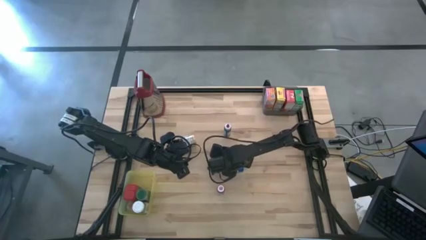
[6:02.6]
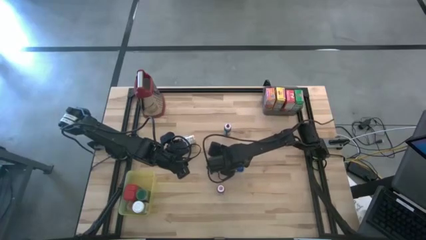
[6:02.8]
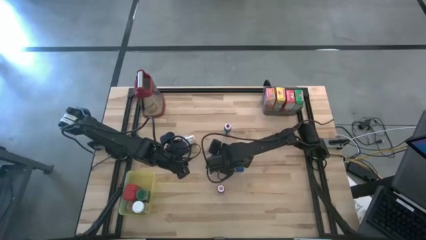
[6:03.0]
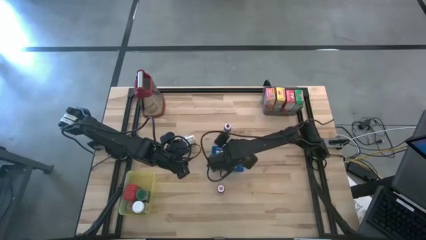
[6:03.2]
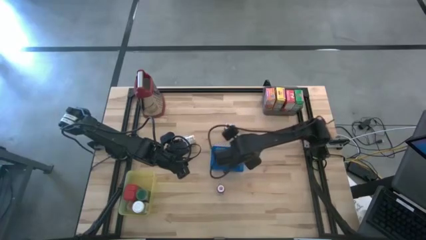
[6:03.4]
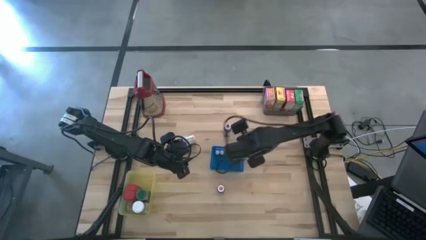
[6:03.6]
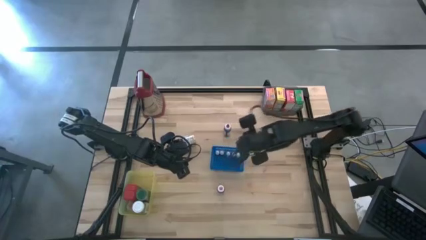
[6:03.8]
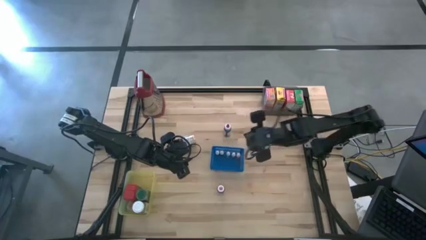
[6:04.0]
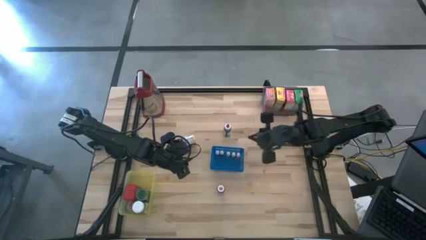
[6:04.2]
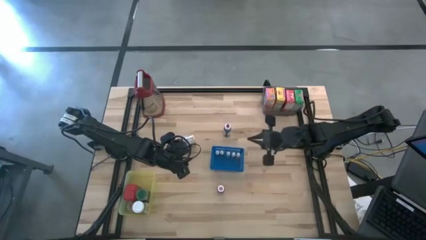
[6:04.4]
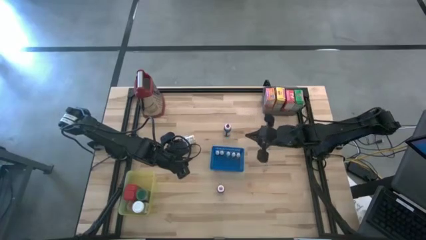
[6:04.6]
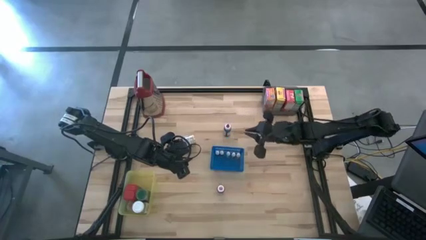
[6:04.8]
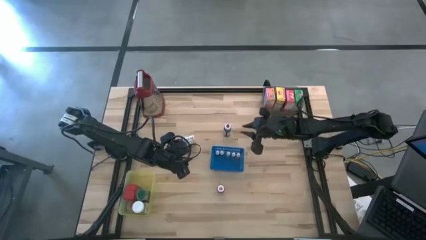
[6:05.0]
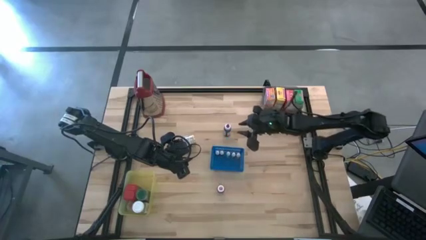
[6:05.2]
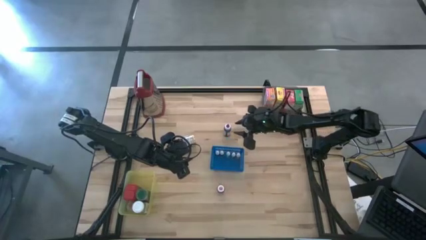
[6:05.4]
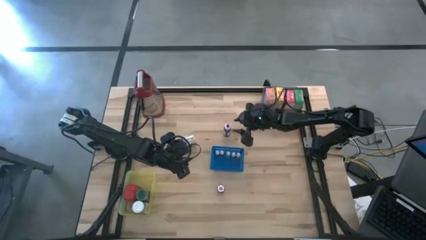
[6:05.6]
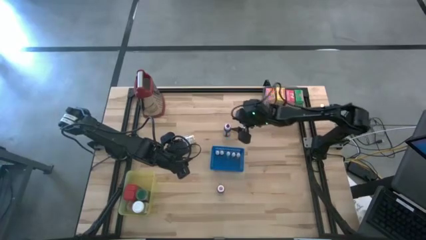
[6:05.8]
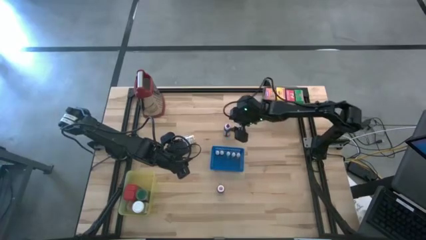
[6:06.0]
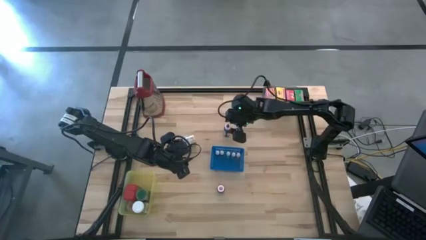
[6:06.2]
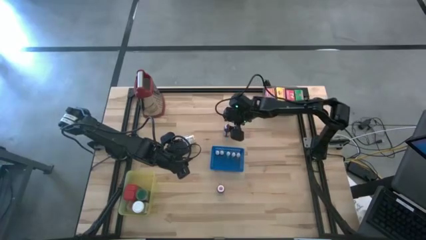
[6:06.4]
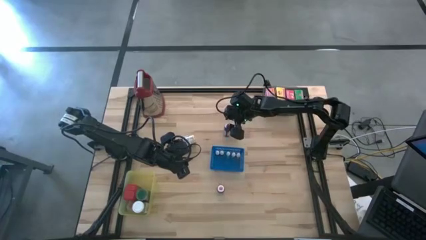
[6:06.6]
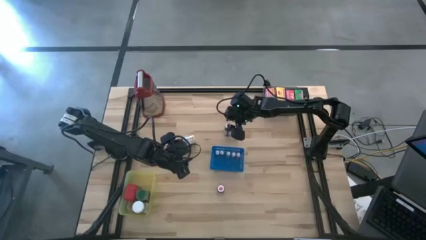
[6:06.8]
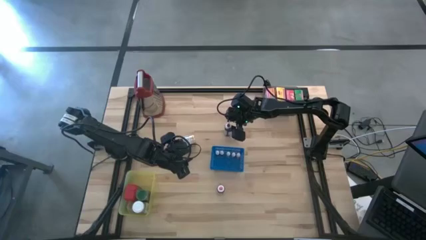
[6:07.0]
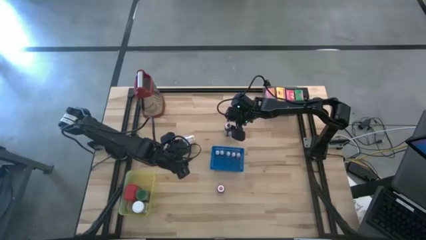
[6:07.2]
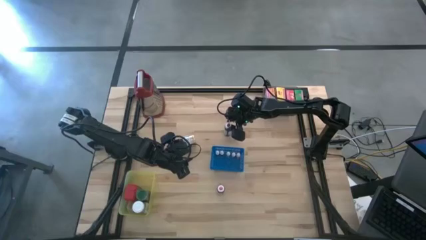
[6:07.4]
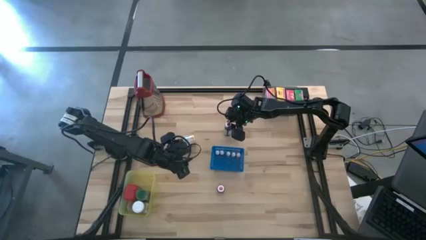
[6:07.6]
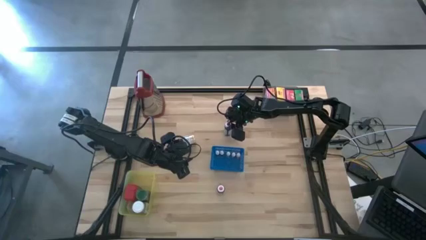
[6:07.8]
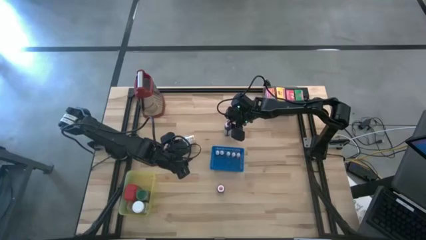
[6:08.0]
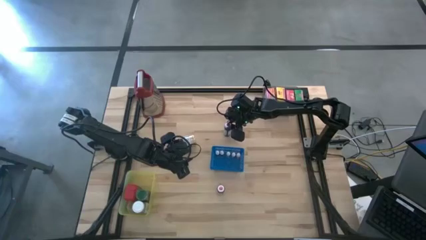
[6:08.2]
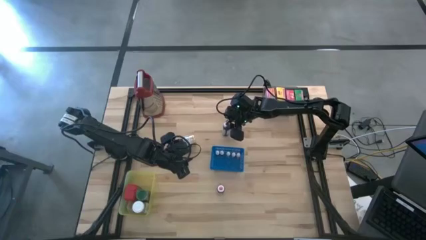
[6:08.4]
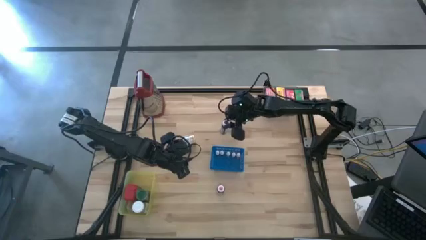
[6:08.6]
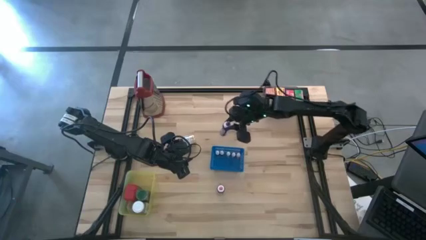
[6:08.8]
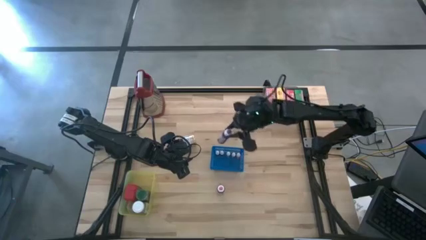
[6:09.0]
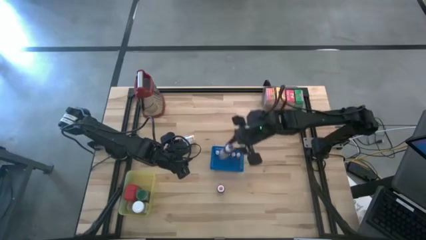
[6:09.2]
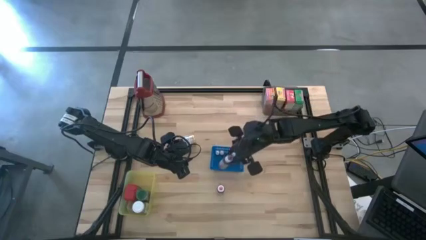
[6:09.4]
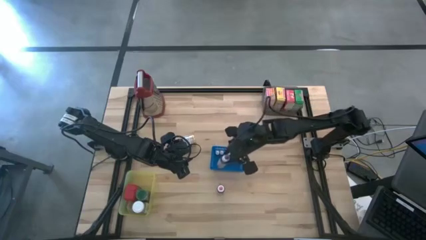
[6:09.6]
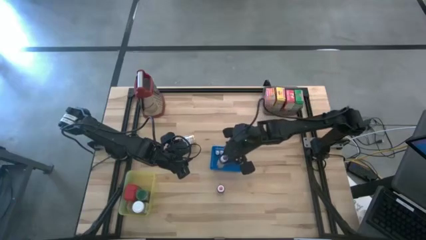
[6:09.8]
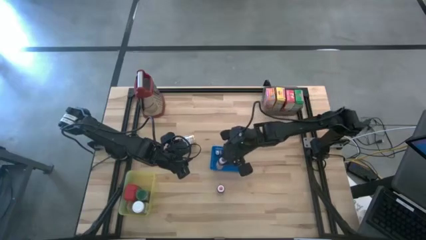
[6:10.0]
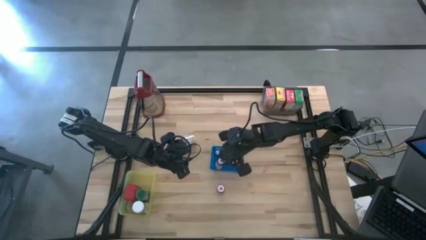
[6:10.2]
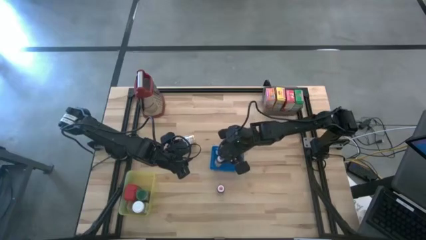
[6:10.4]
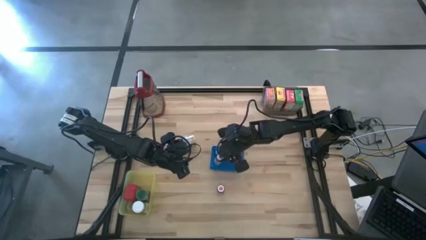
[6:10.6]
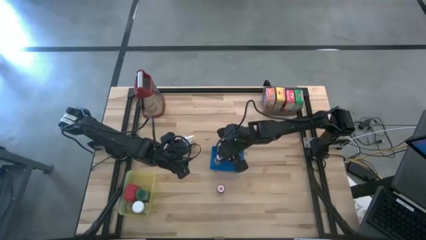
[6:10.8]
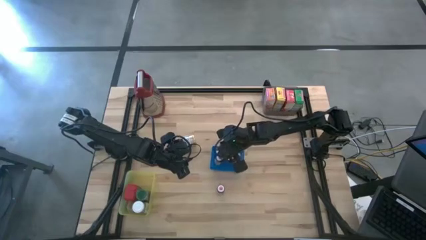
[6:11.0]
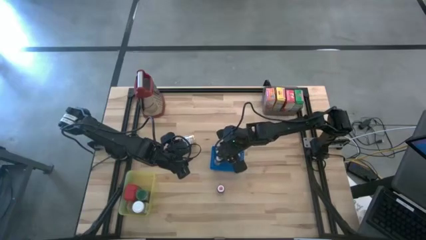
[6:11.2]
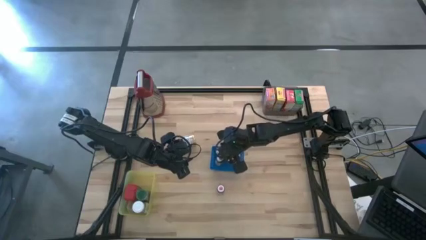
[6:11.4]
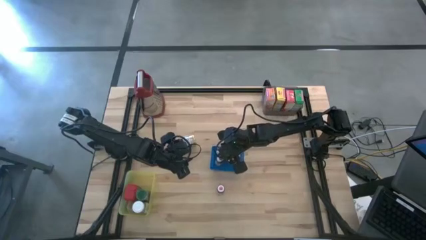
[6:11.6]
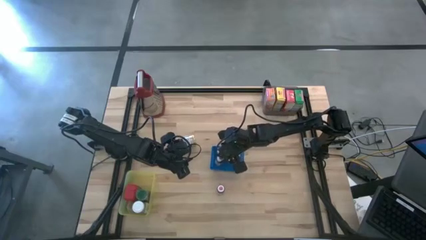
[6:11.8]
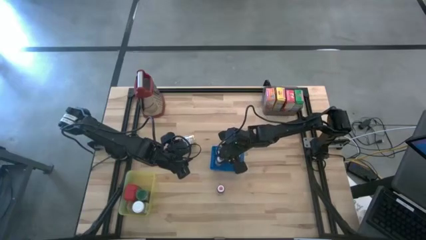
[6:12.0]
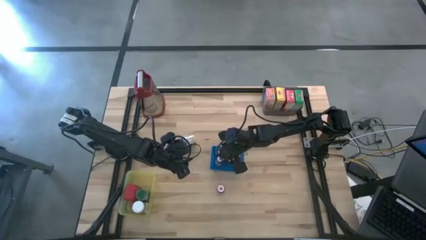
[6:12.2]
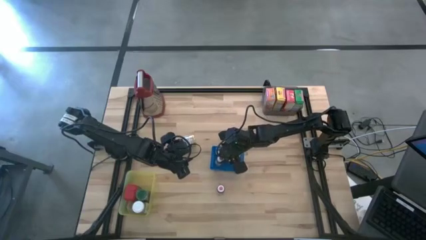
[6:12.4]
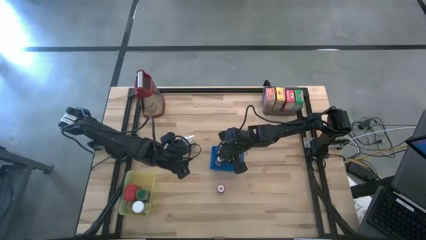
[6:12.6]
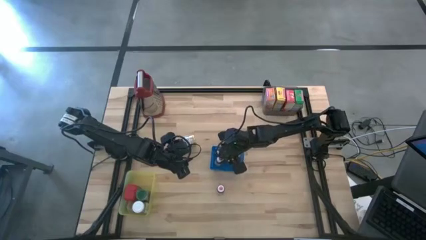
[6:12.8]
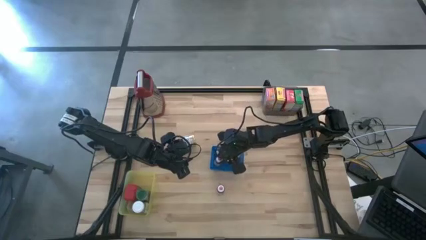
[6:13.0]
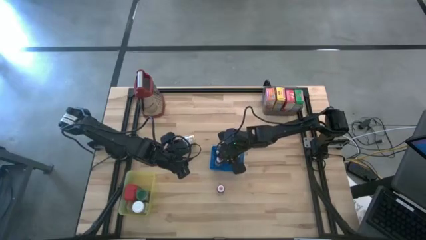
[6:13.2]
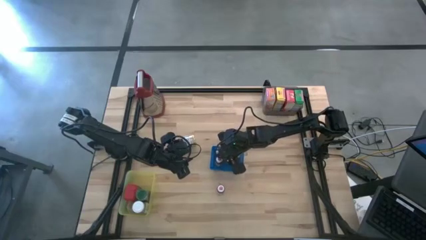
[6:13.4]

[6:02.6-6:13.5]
Task: Pick & Place Kitchen Items
Put the large purple food coloring bottle into the blue bin
